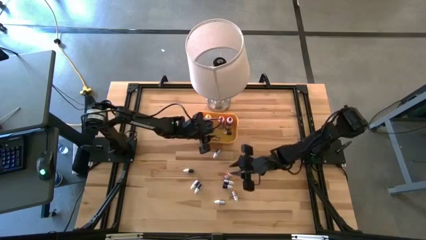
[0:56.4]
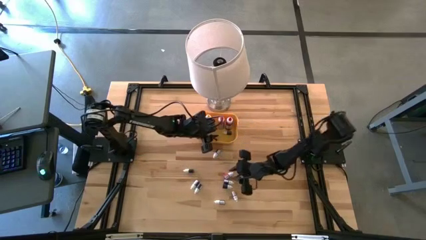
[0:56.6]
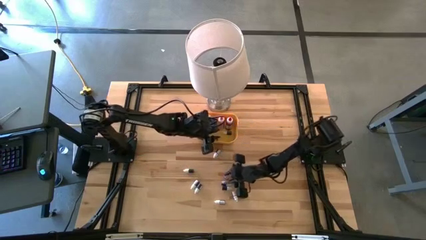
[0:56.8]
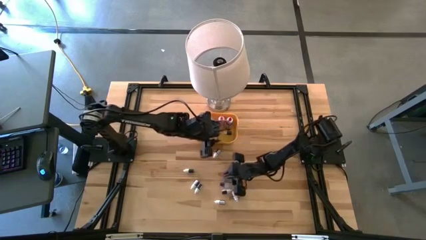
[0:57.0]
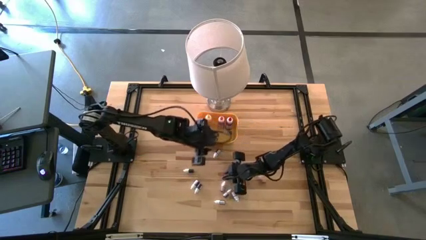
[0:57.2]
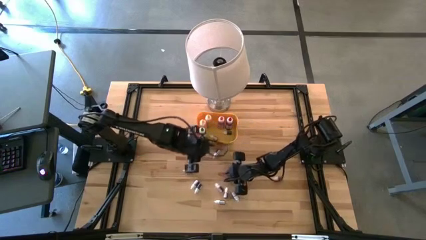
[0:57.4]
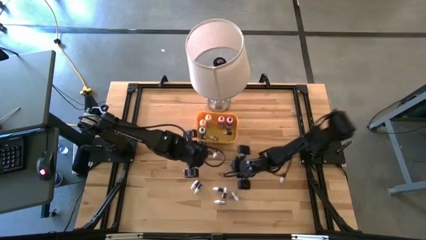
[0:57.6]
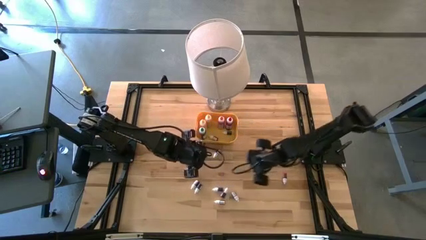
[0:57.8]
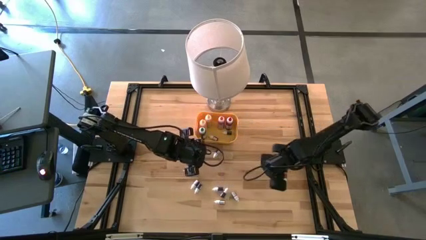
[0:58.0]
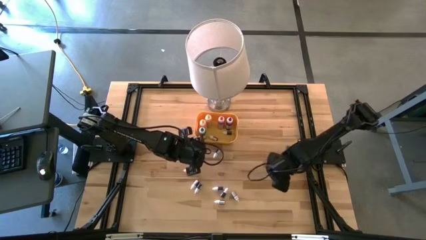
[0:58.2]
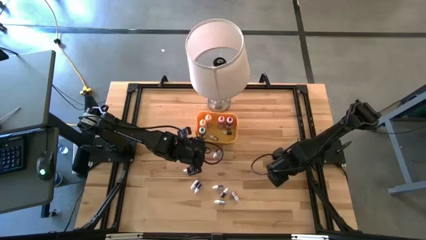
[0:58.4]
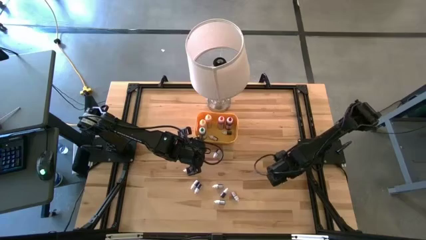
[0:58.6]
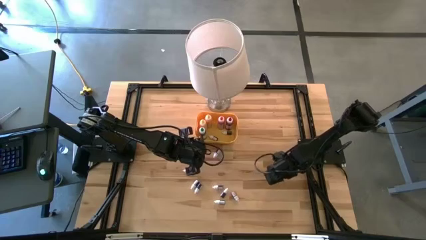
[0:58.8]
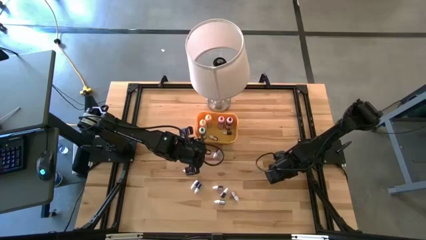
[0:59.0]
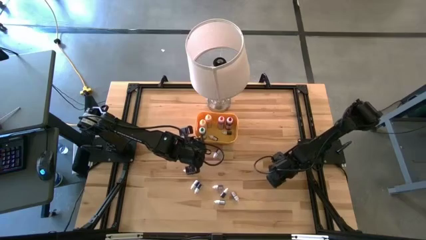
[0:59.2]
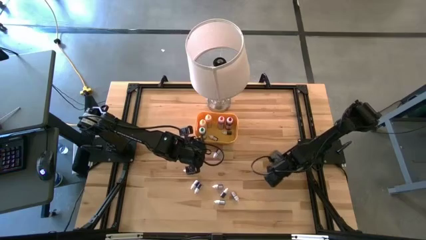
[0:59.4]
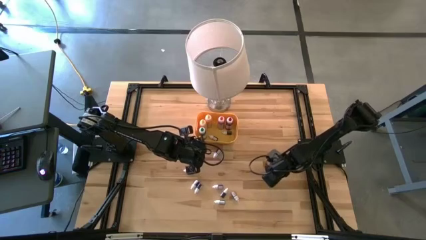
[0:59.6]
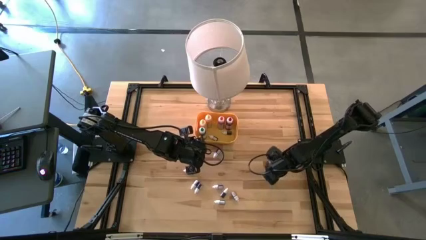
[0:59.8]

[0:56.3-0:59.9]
Task: Pick & Place food coloring
Put the red food coloring bottle into the yellow bin

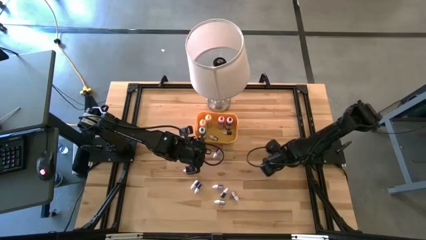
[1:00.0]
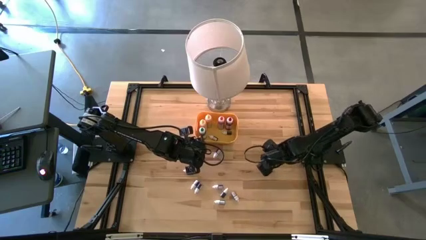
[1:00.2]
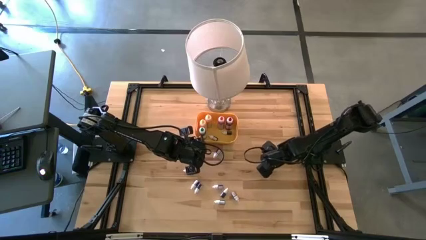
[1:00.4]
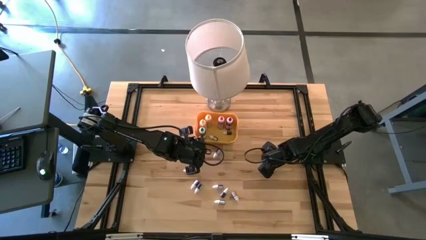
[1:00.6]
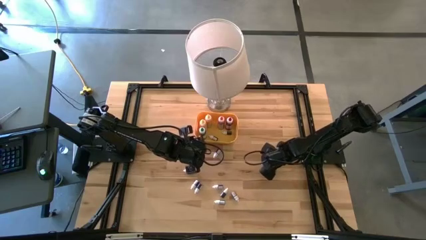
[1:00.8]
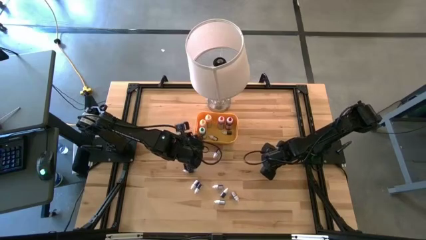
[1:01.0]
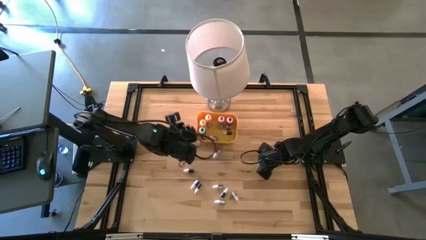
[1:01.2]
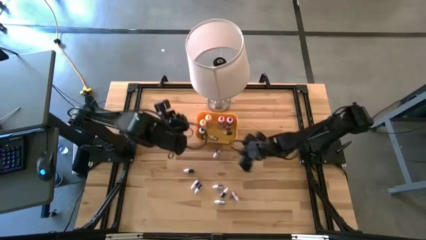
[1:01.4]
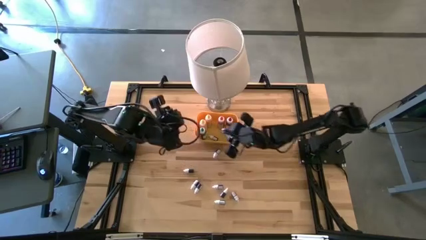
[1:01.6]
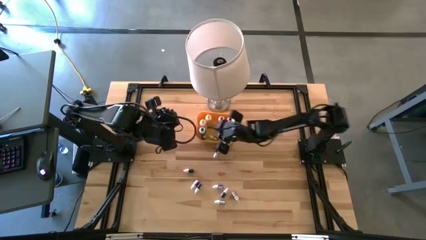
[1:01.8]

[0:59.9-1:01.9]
Put the red food coloring bottle into the yellow bin

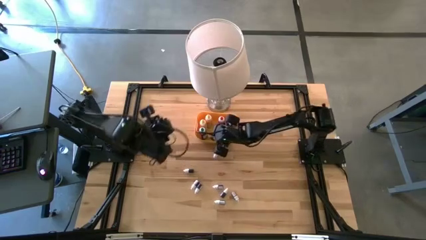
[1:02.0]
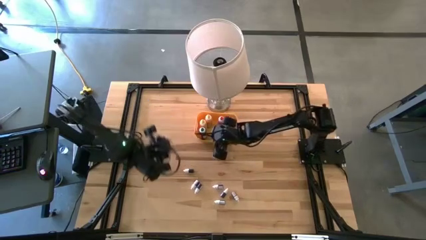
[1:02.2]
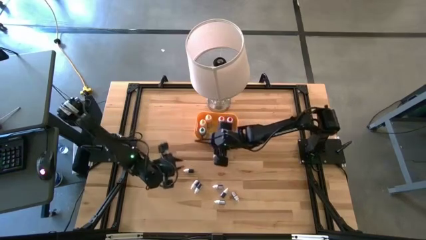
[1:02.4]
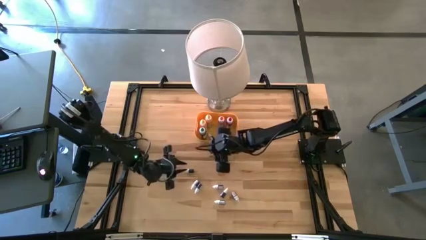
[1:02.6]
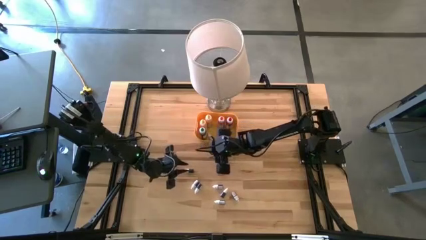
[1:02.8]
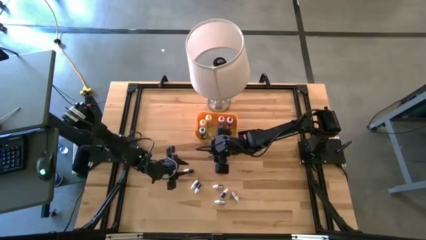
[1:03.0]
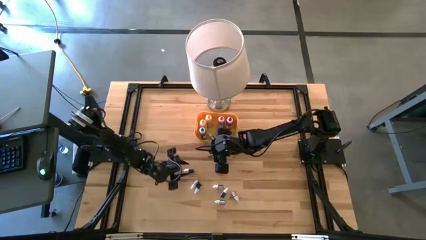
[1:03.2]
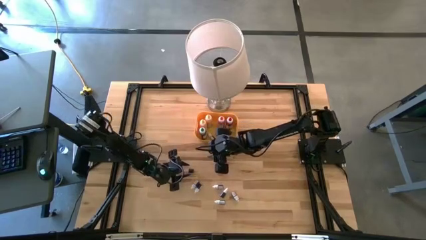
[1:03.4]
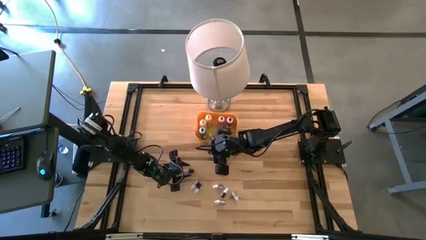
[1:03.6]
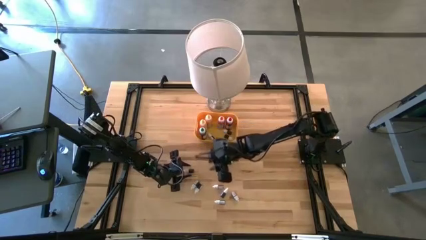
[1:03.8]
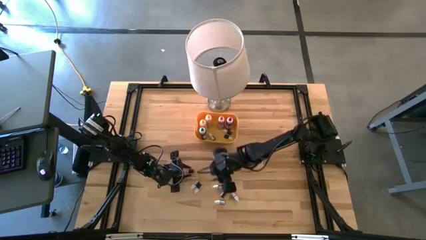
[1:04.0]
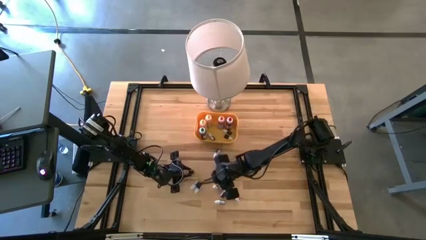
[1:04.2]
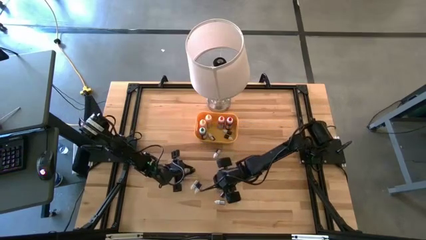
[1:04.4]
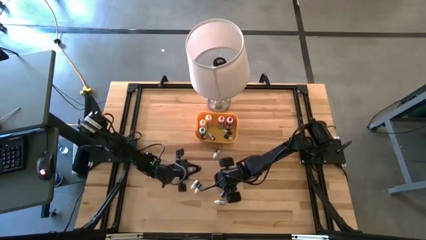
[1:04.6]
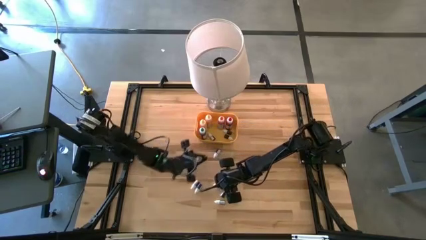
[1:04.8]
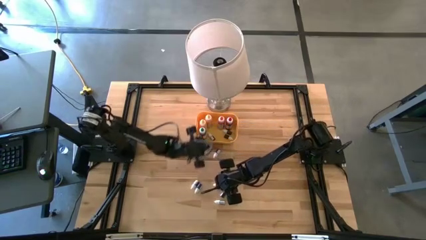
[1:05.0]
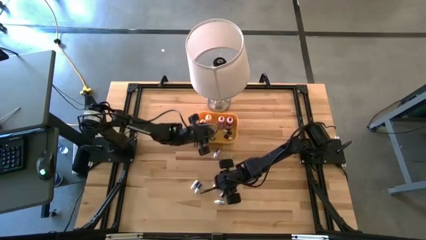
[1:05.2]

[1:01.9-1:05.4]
Put the green food coloring bottle into the yellow bin

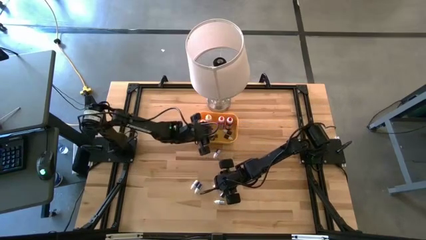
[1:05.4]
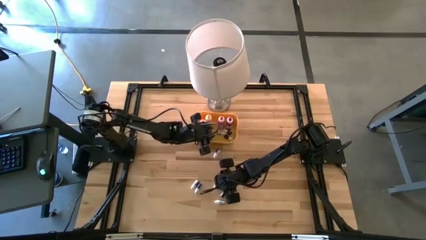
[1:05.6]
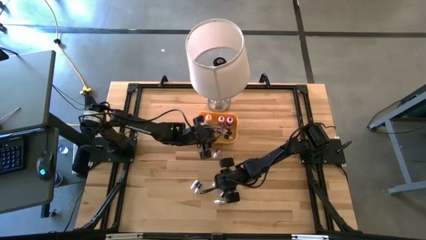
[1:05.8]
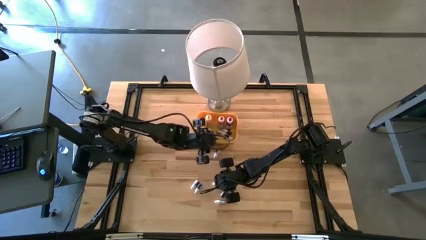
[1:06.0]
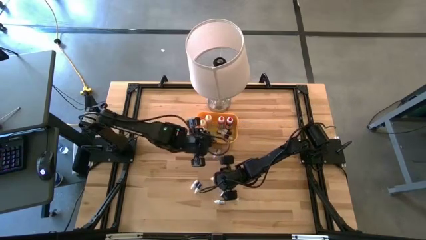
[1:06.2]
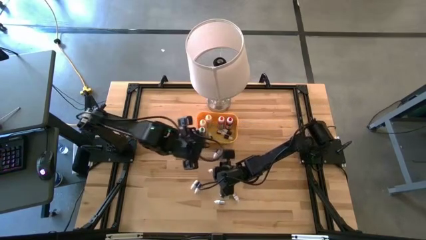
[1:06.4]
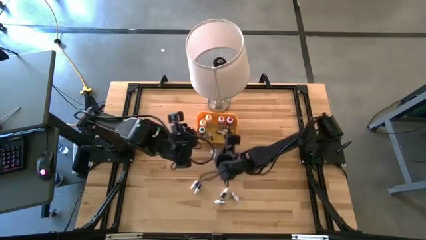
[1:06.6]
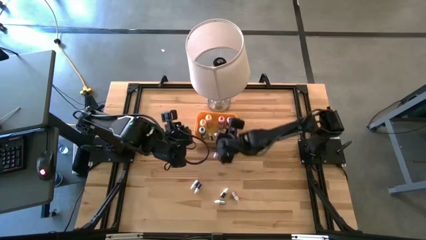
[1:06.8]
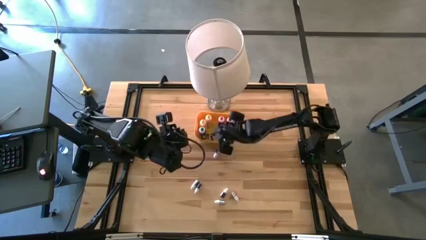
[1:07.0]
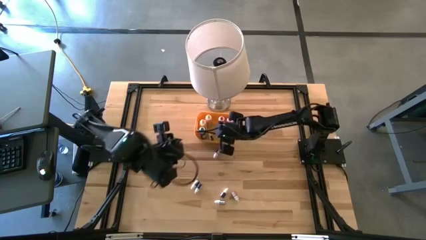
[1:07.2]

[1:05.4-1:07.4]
Put the red food coloring bottle into the yellow bin

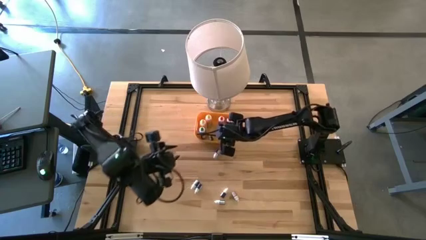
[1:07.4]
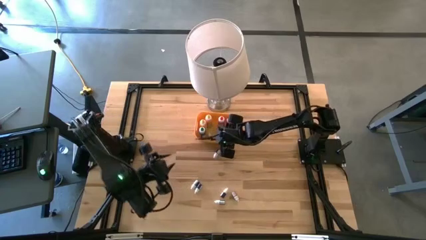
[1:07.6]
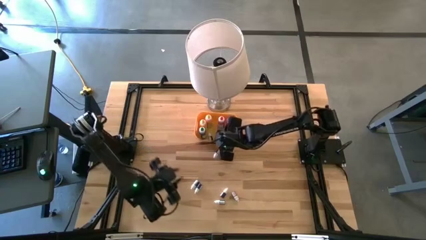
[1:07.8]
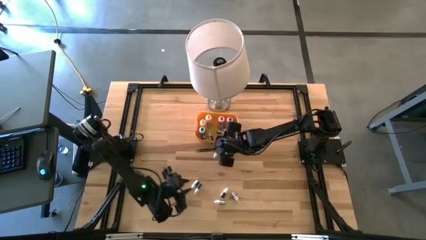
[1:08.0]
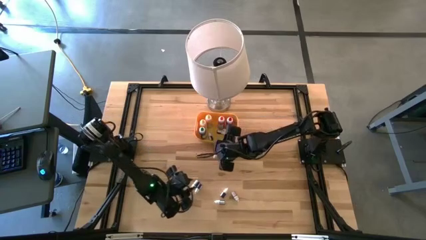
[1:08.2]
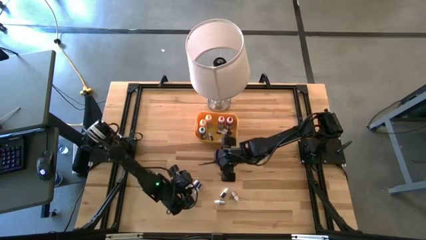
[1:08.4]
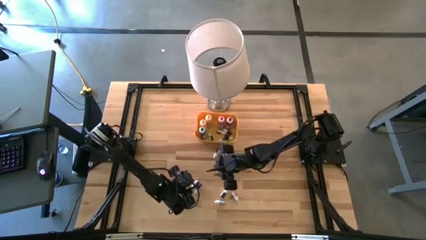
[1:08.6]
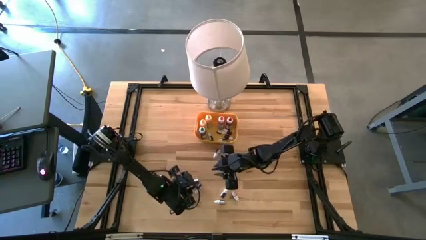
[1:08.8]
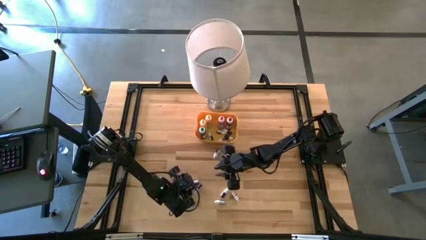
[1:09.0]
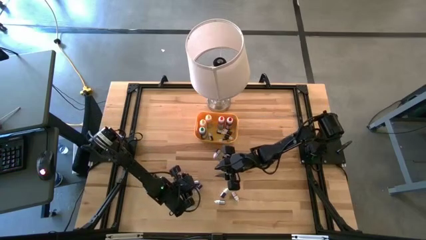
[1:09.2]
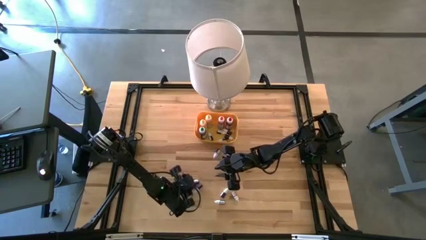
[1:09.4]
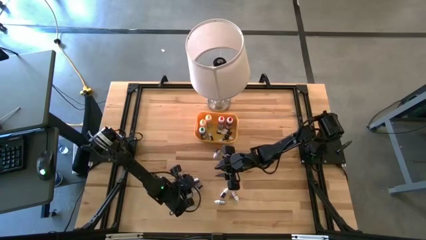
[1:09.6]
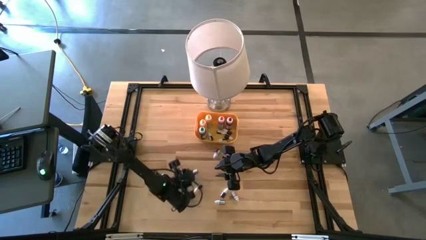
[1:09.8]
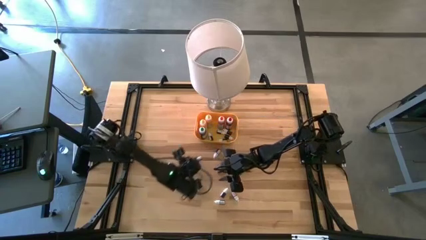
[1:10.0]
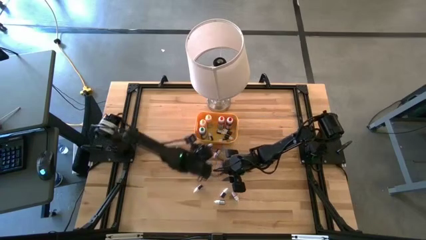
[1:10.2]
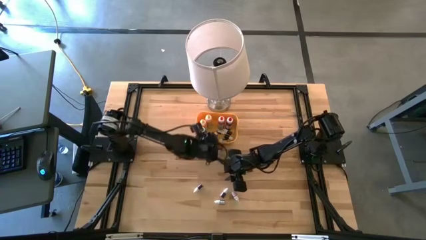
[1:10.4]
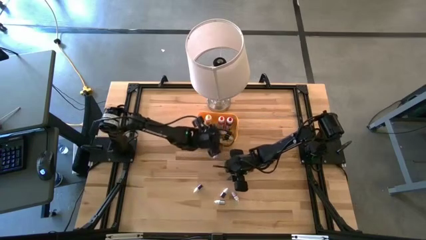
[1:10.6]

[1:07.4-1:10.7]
Put the blue food coloring bottle into the yellow bin

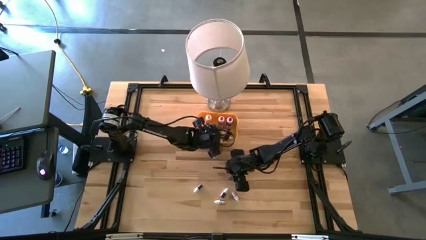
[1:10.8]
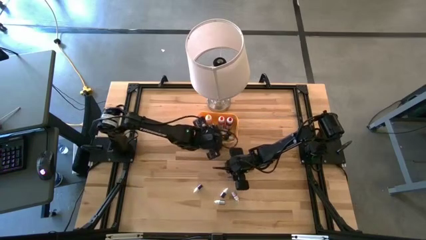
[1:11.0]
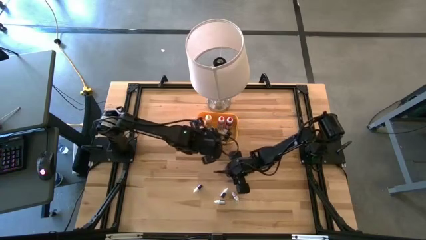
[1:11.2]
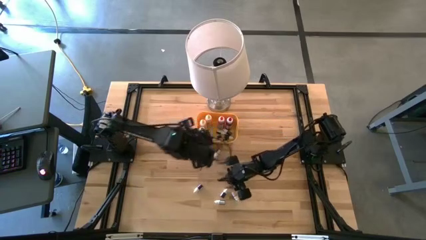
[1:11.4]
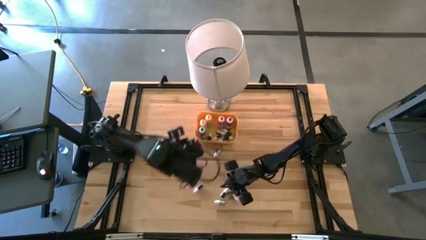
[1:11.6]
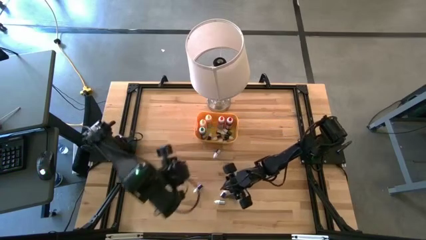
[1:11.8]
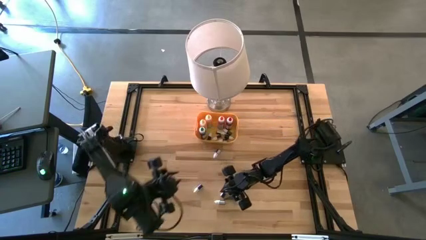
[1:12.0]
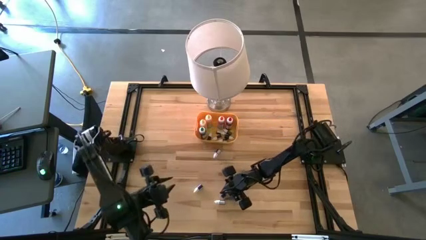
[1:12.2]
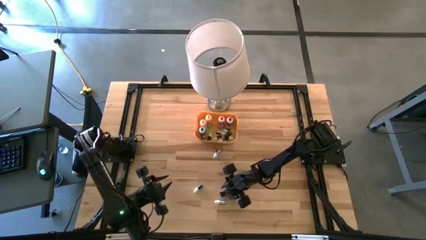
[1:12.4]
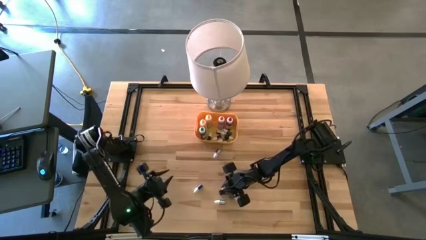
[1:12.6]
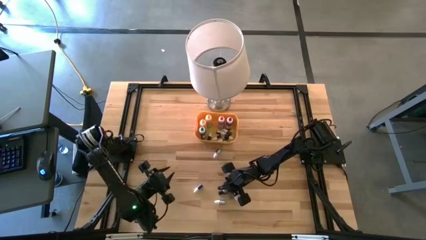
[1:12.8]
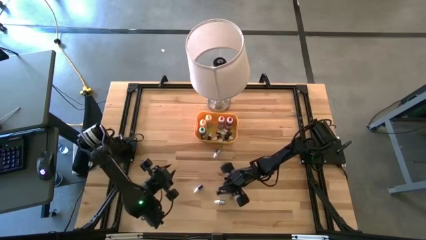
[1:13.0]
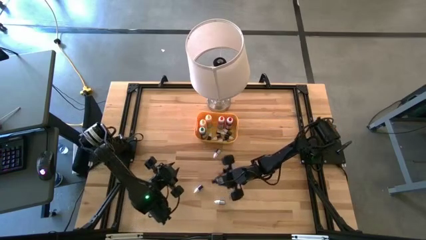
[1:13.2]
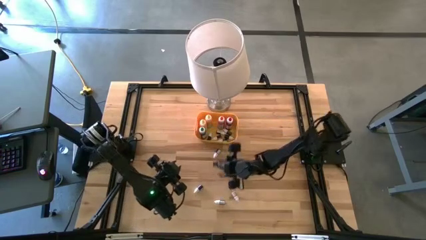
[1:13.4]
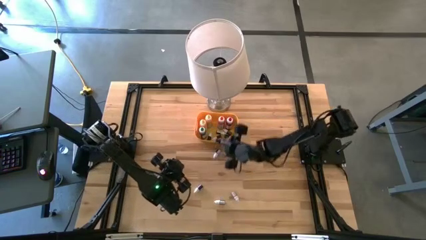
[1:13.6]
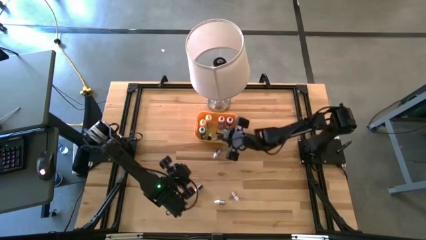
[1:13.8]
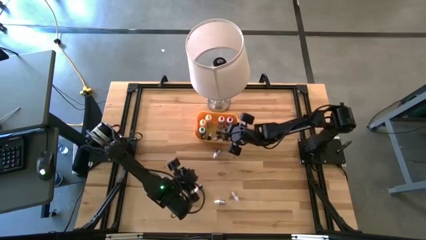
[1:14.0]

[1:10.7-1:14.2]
Put the blue food coloring bottle into the yellow bin
